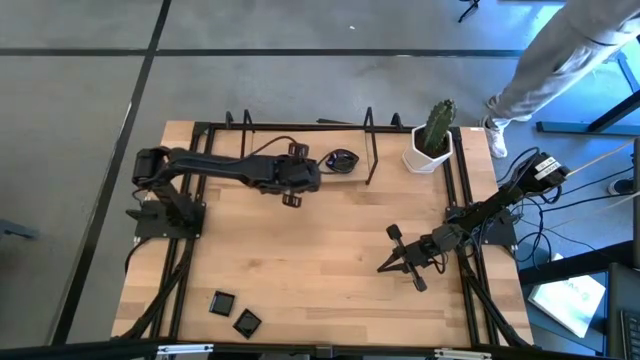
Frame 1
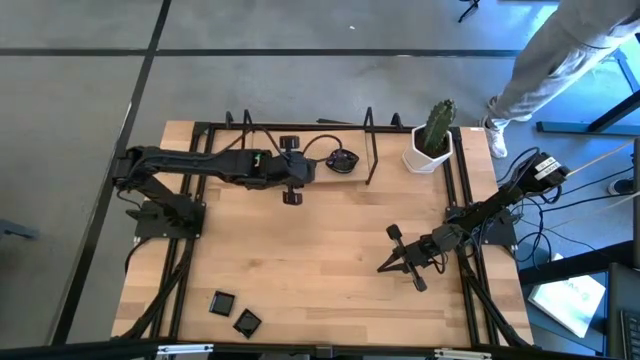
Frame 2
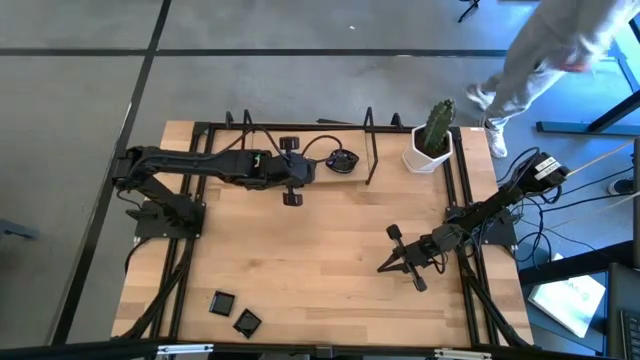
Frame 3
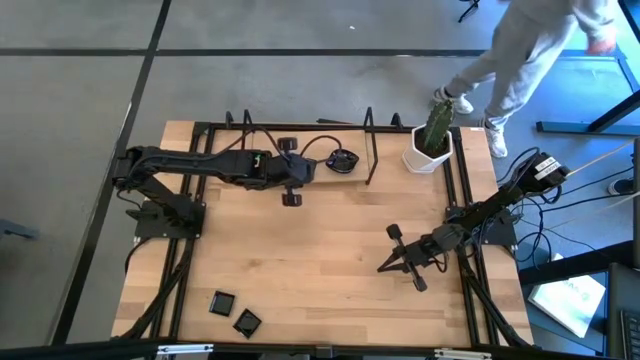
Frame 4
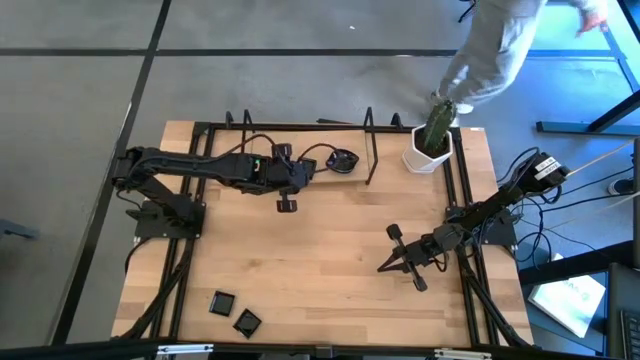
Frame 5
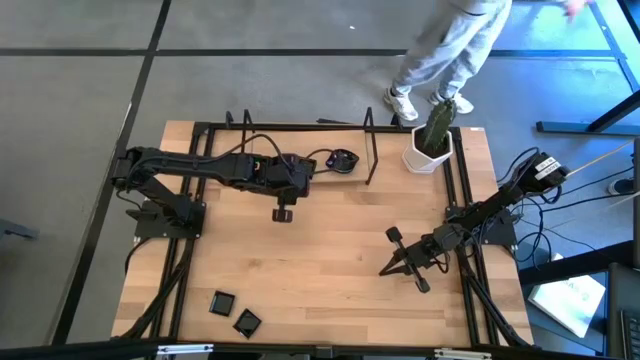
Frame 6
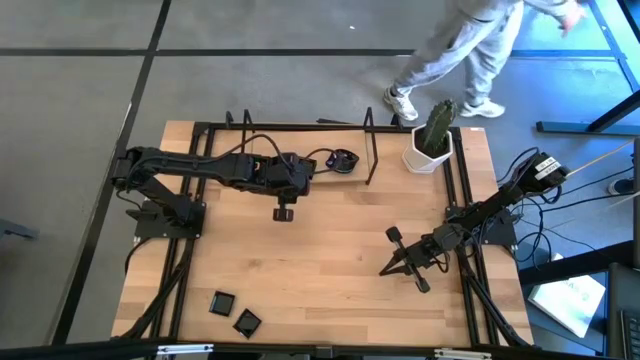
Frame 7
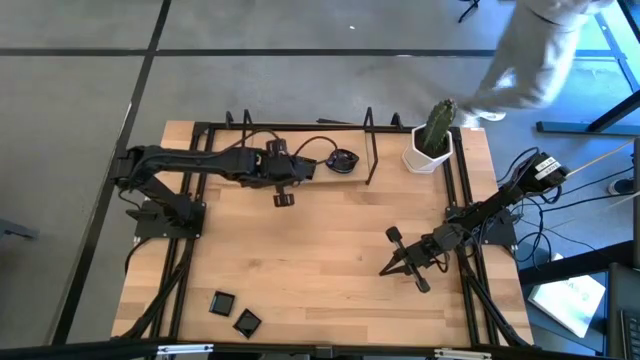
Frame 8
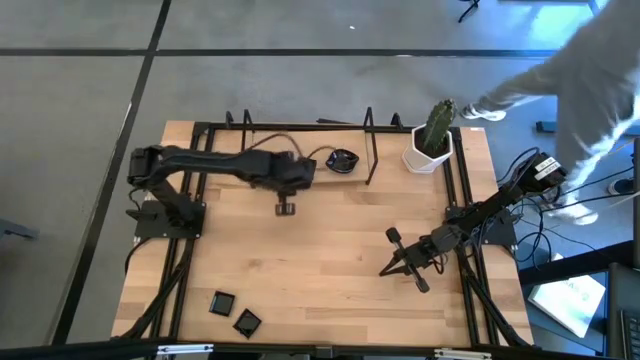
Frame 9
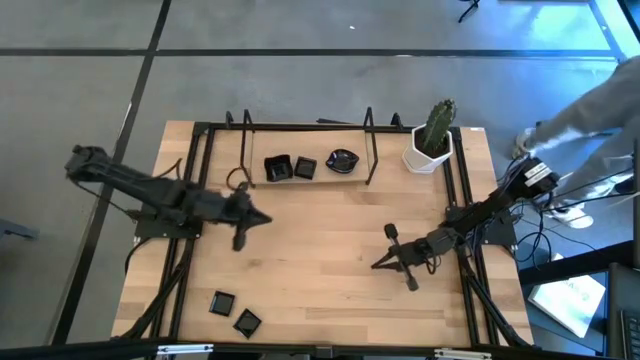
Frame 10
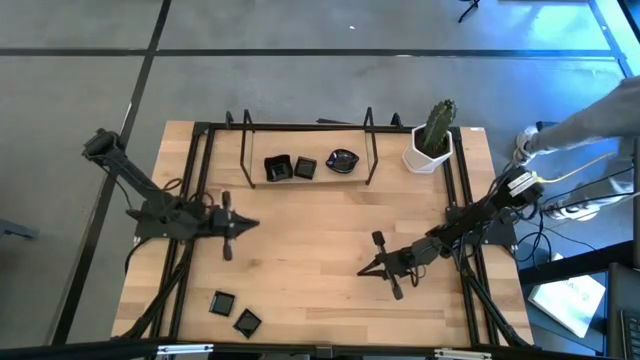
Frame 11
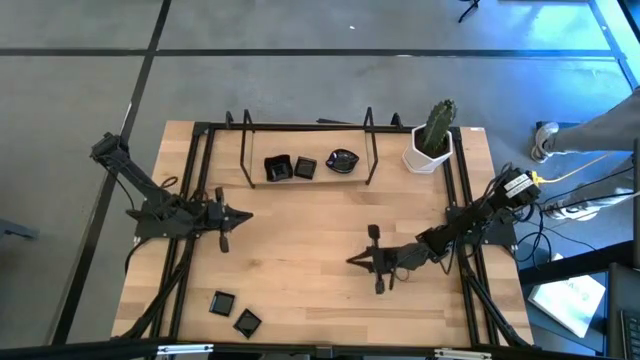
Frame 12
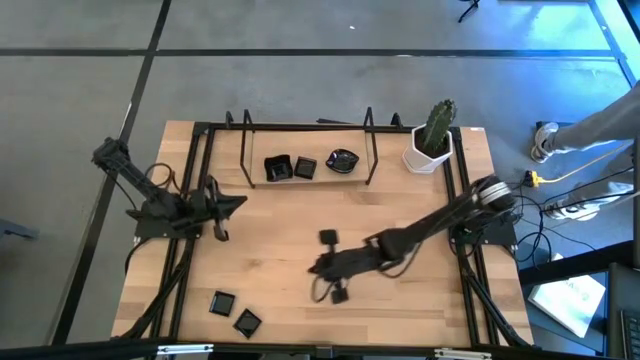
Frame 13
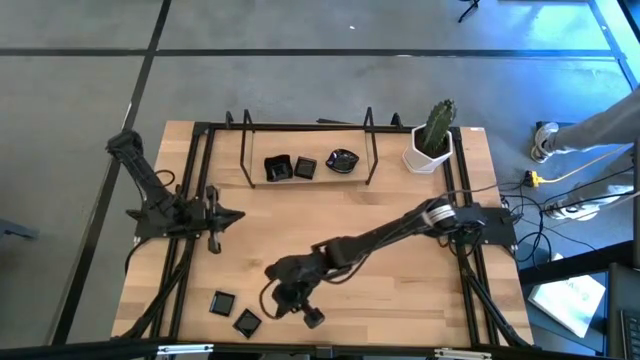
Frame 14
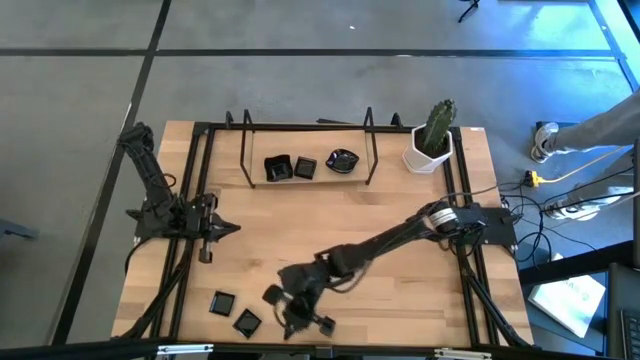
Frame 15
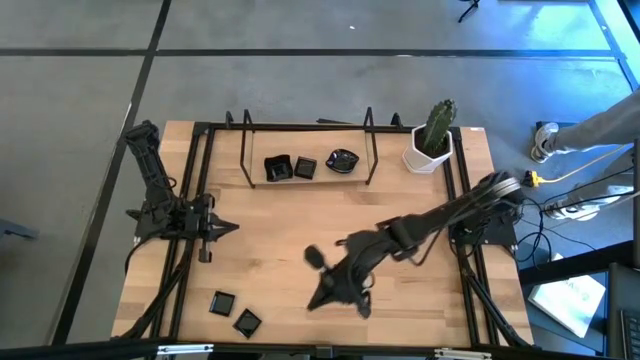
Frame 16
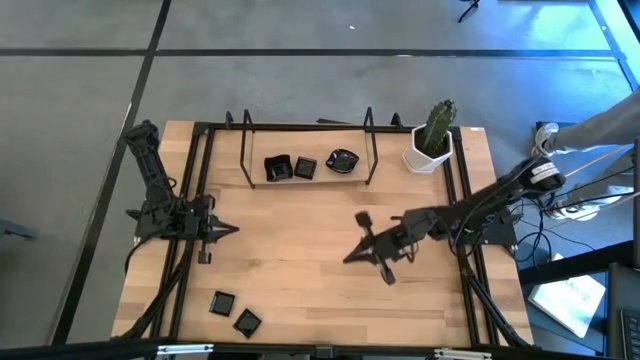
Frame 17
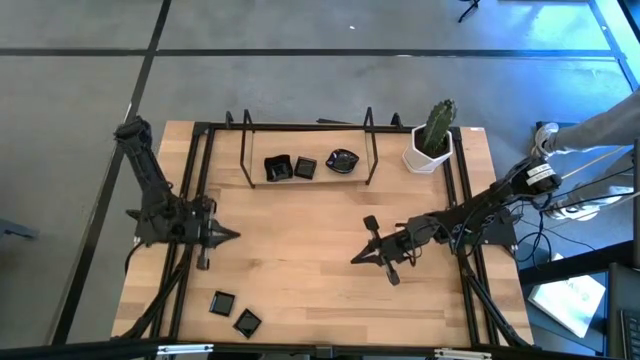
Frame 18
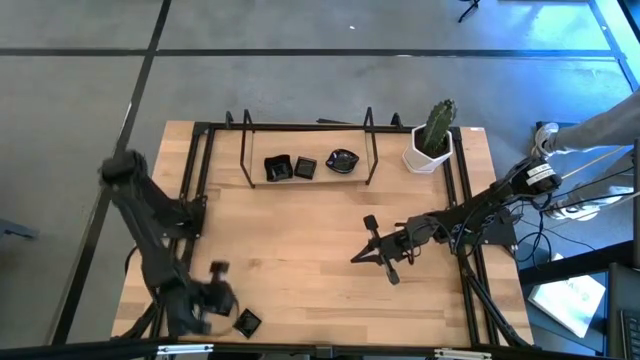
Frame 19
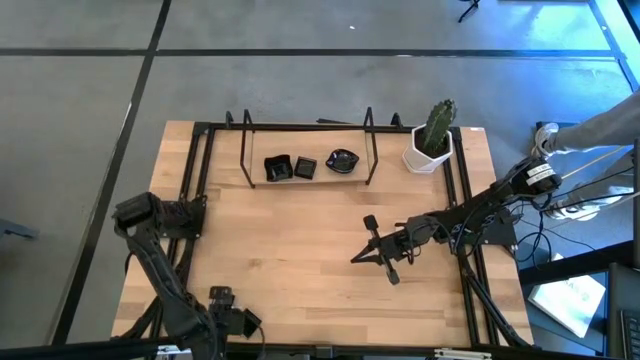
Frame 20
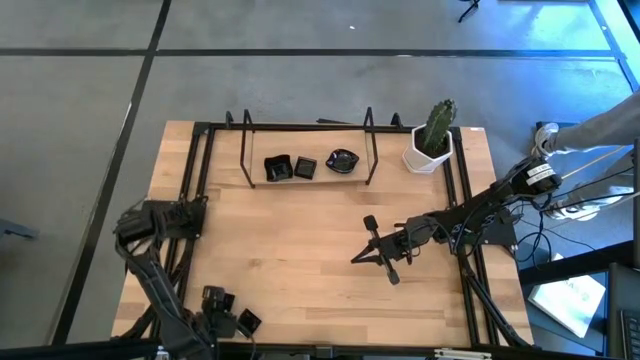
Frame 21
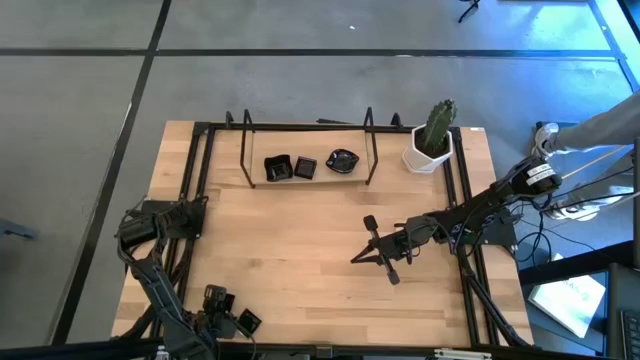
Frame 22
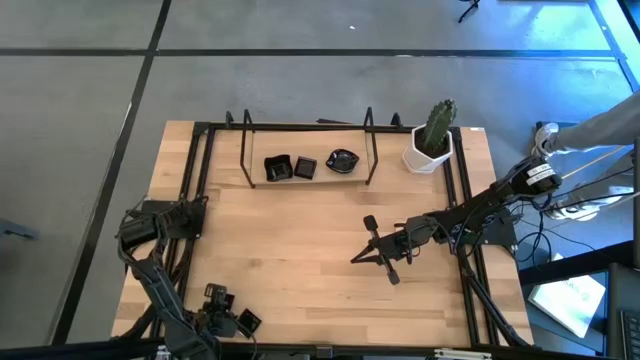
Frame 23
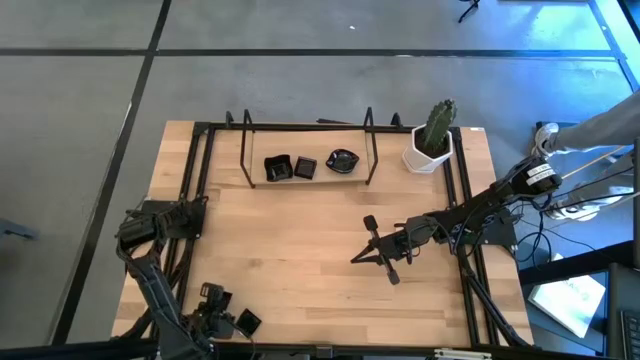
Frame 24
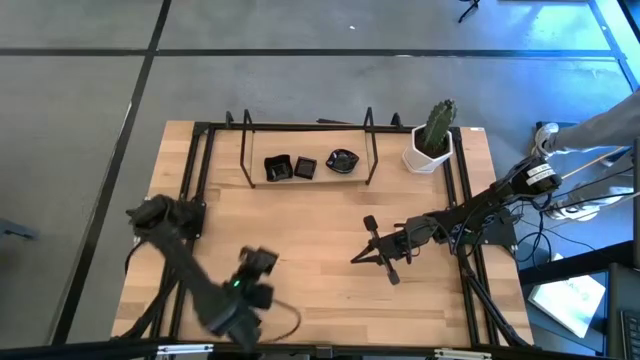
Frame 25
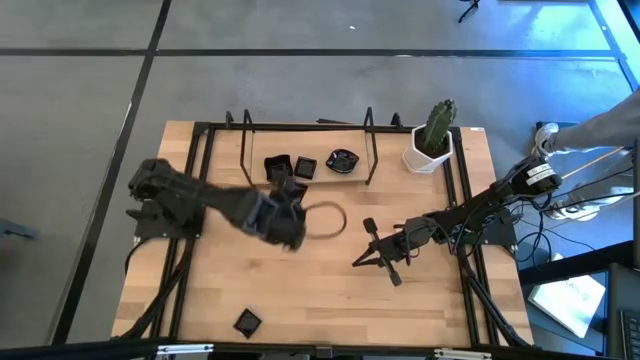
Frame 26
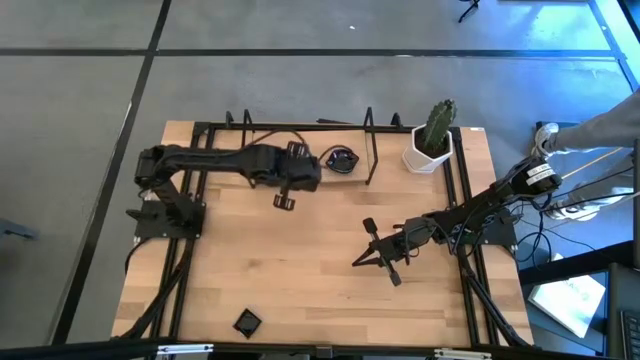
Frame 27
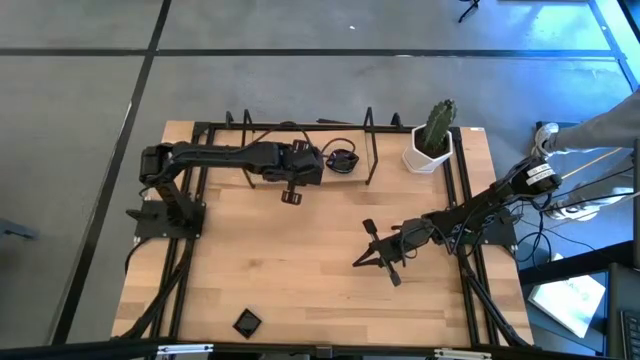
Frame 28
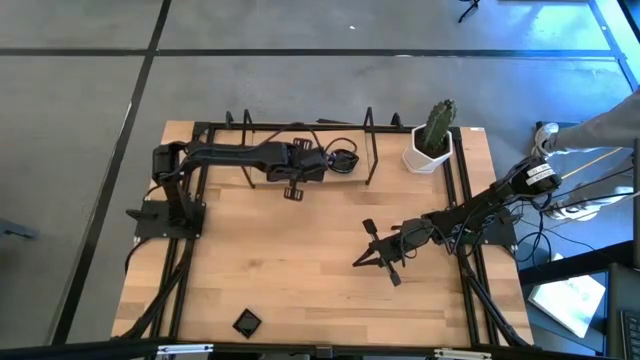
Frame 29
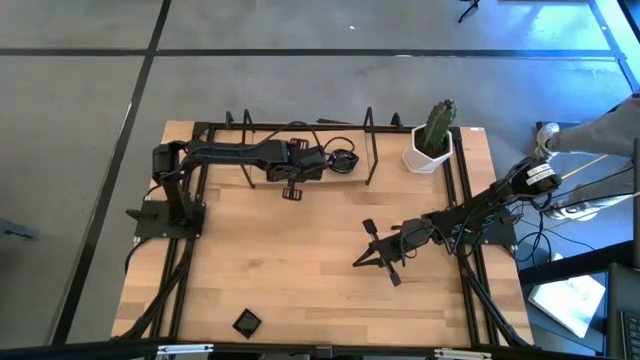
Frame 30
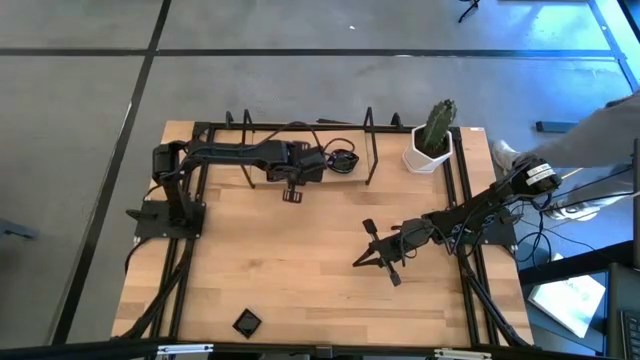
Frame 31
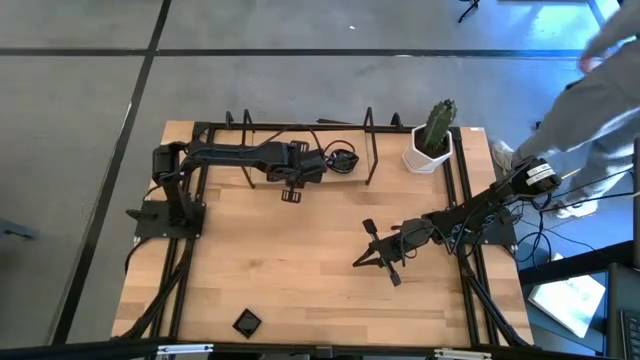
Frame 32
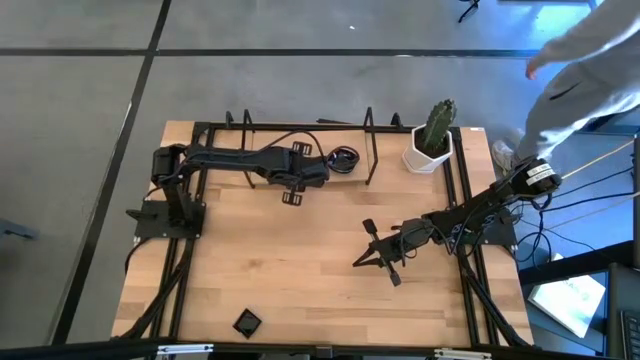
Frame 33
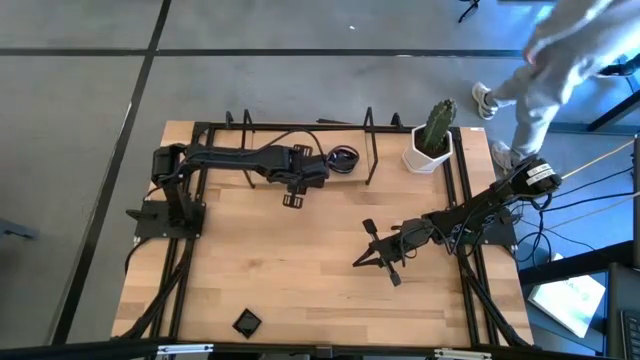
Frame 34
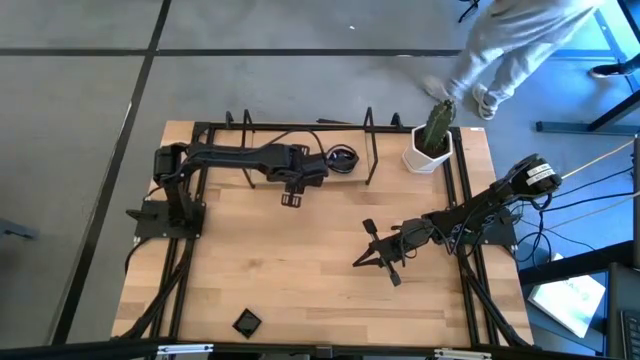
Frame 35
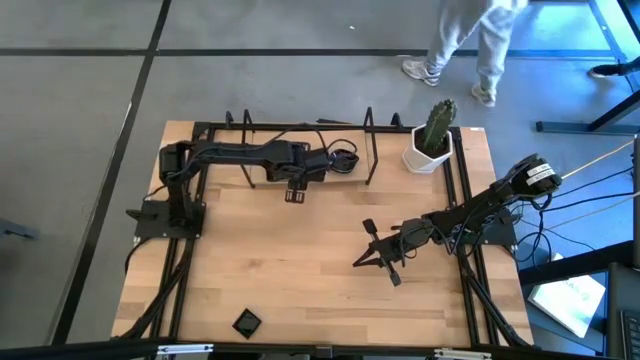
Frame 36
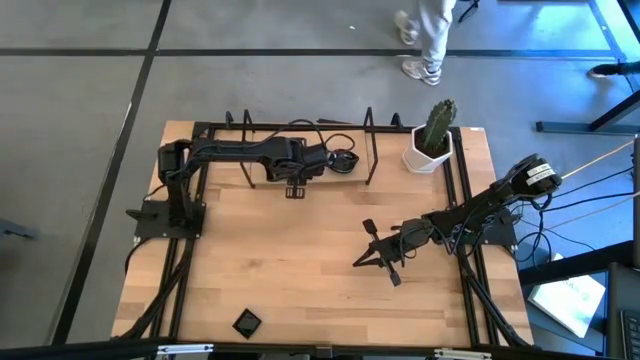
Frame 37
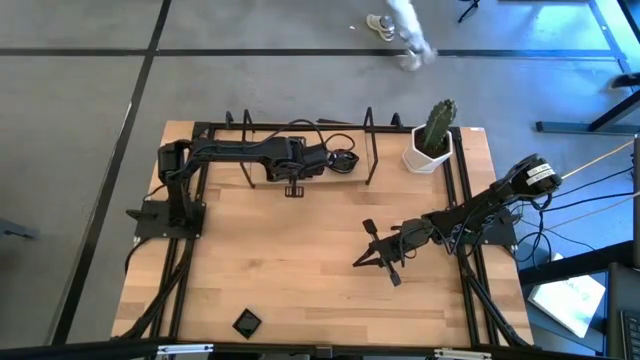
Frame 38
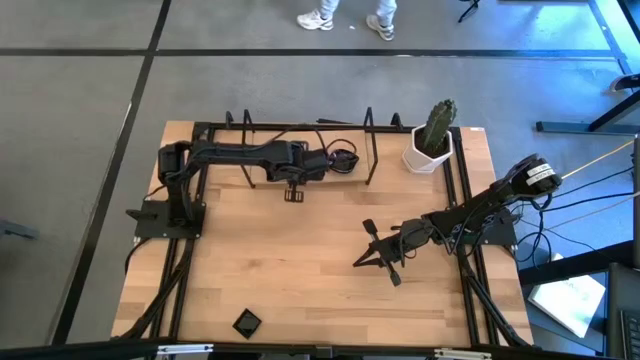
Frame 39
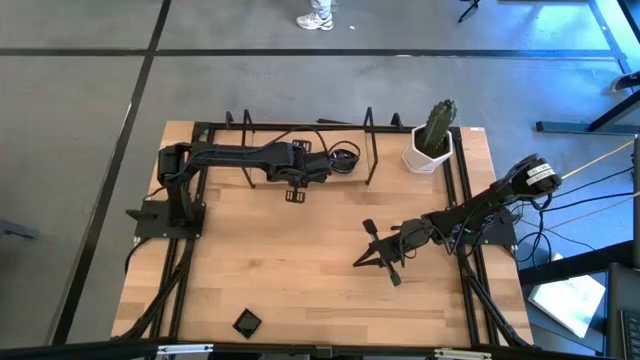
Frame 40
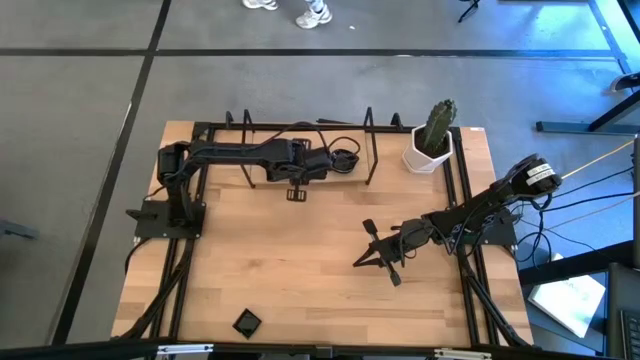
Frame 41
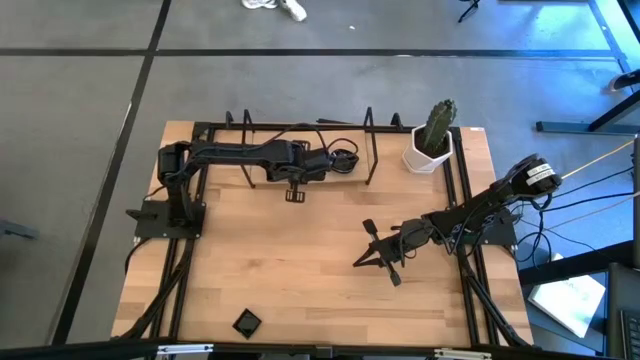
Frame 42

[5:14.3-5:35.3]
Task: Pick & Place Mini shaped plates
Stack the square plate on top of the square plate on the shelf
